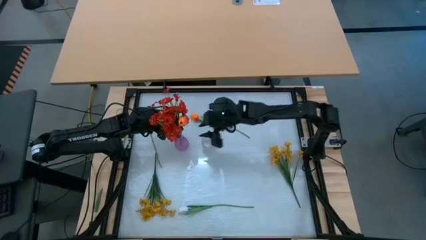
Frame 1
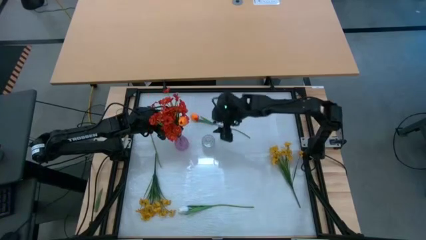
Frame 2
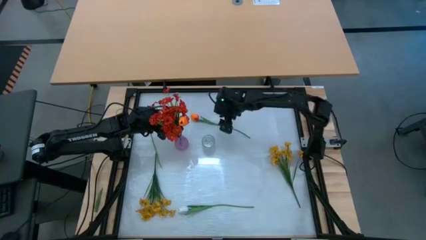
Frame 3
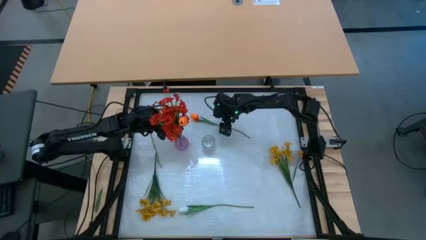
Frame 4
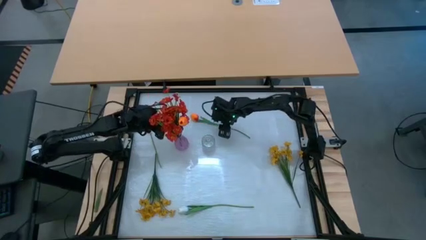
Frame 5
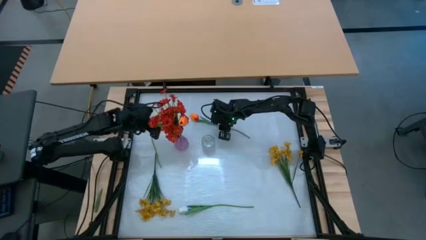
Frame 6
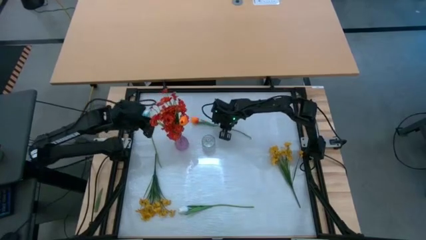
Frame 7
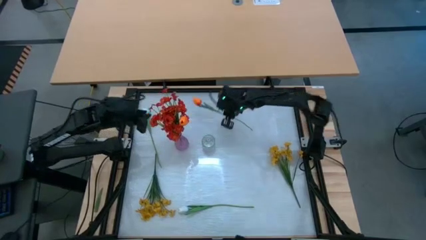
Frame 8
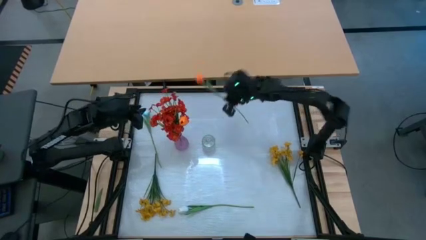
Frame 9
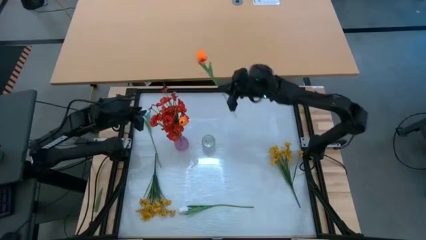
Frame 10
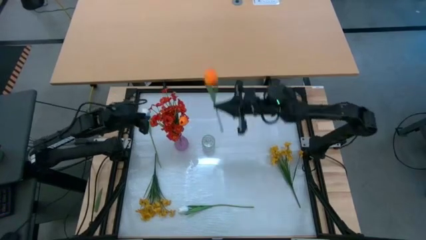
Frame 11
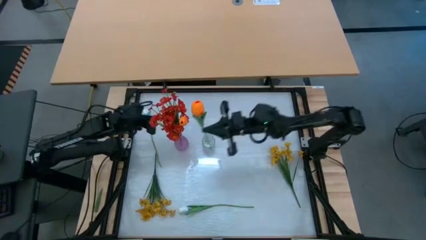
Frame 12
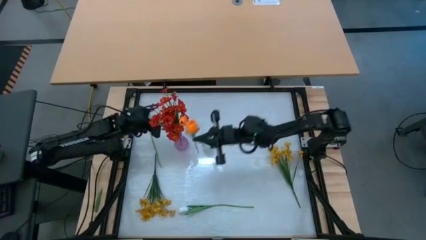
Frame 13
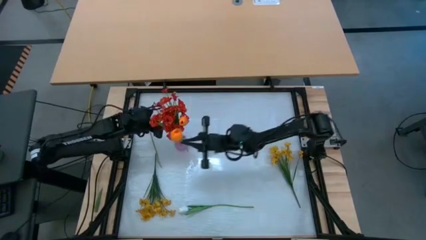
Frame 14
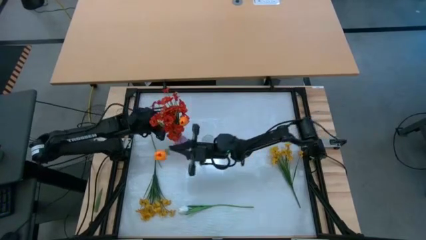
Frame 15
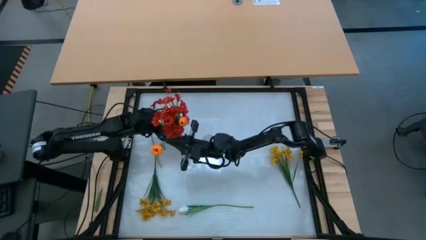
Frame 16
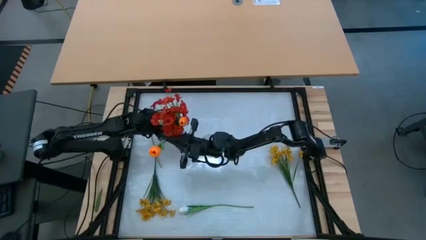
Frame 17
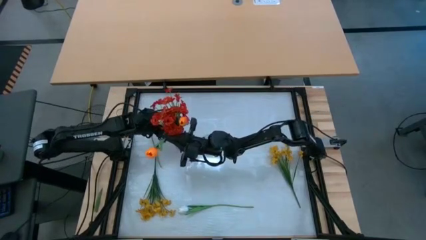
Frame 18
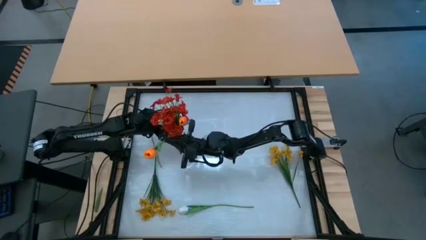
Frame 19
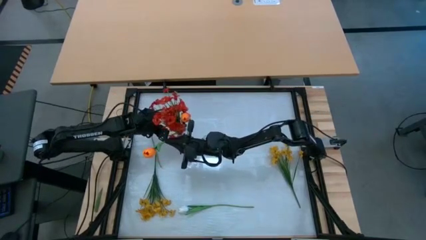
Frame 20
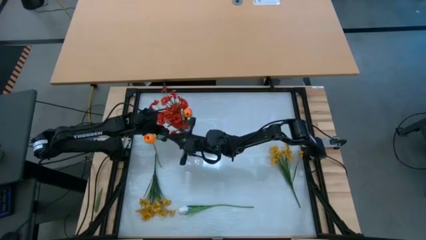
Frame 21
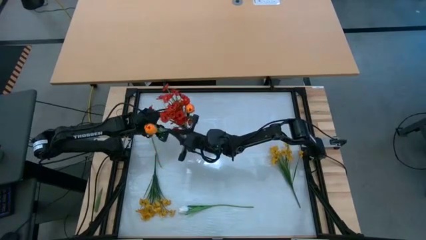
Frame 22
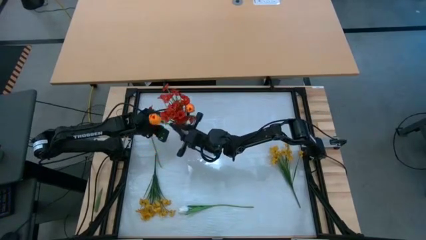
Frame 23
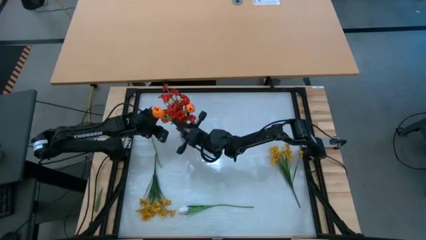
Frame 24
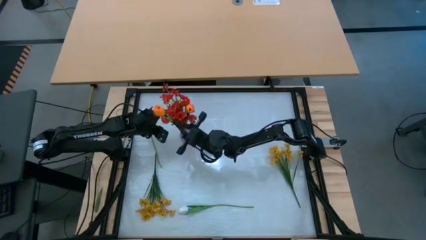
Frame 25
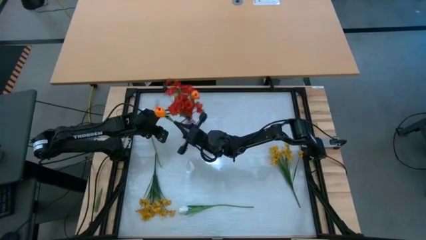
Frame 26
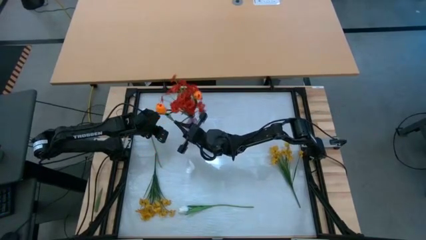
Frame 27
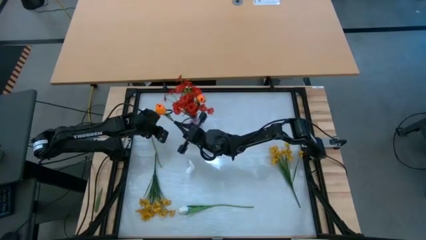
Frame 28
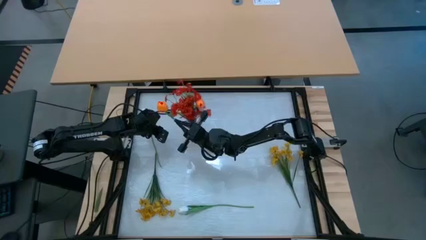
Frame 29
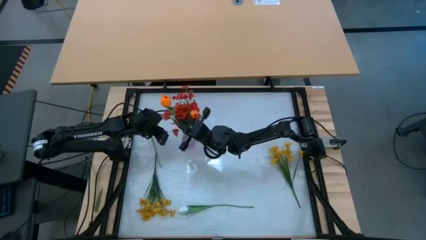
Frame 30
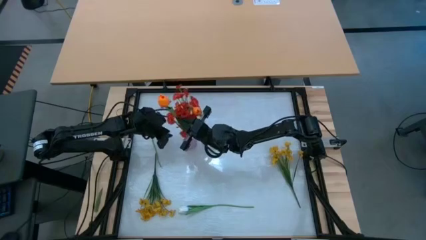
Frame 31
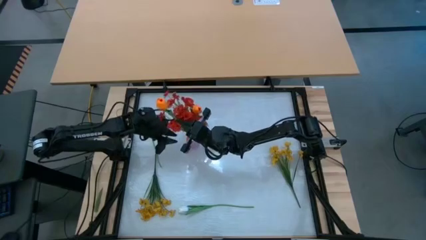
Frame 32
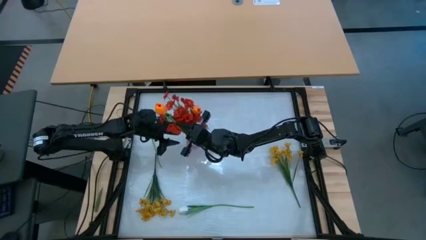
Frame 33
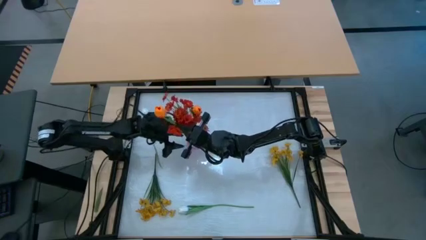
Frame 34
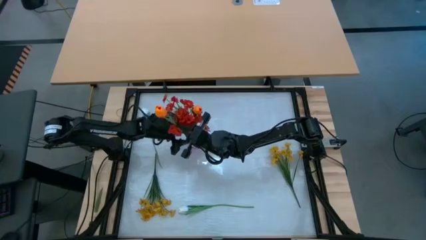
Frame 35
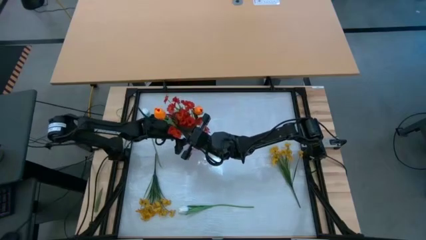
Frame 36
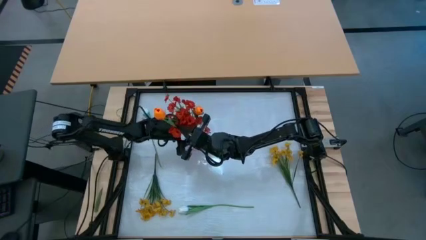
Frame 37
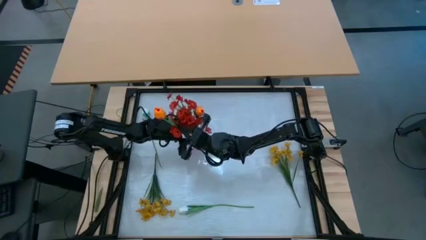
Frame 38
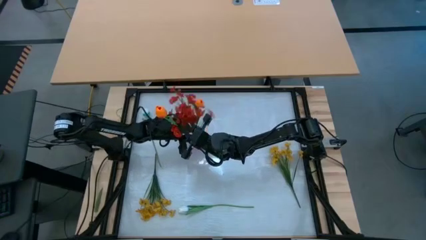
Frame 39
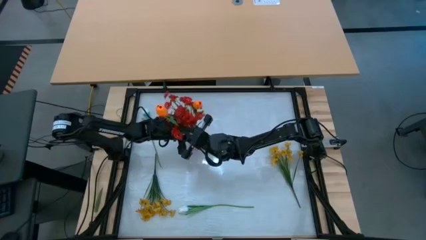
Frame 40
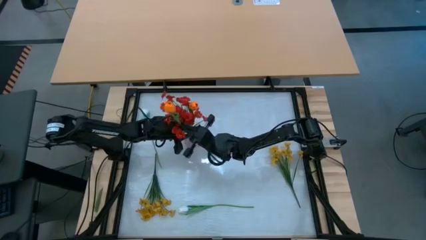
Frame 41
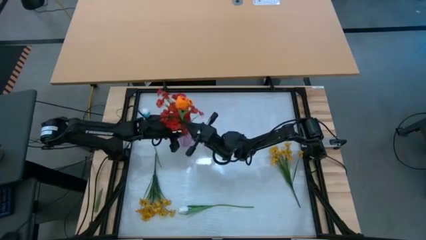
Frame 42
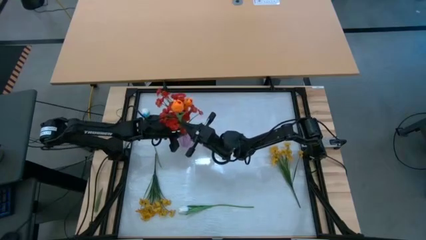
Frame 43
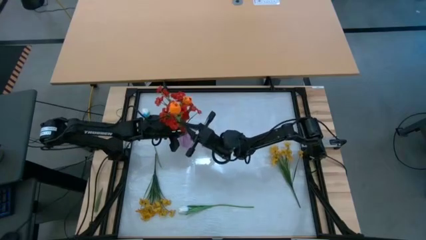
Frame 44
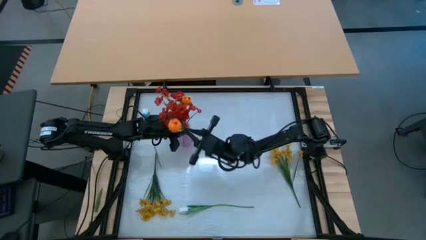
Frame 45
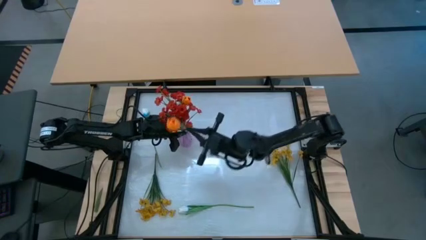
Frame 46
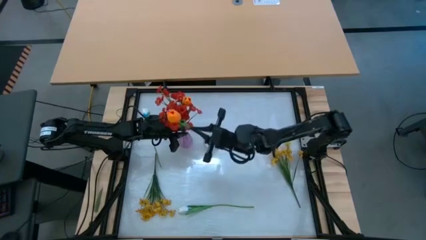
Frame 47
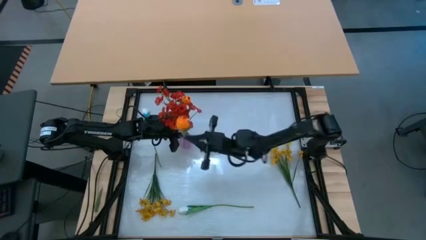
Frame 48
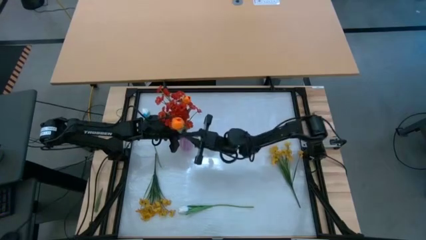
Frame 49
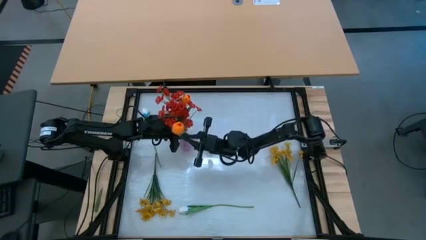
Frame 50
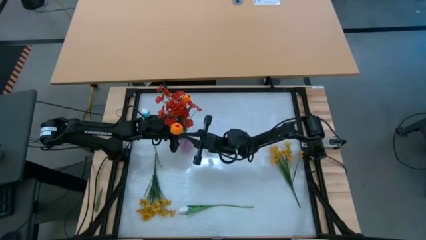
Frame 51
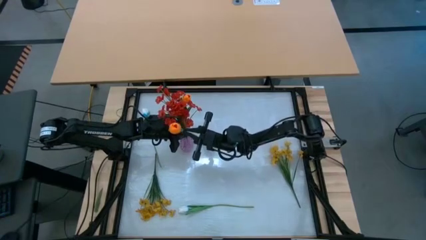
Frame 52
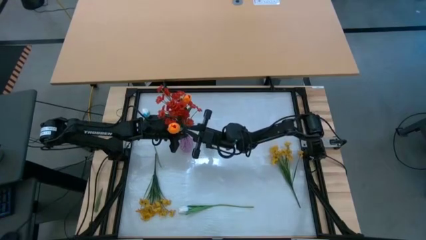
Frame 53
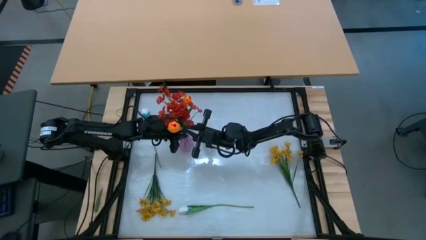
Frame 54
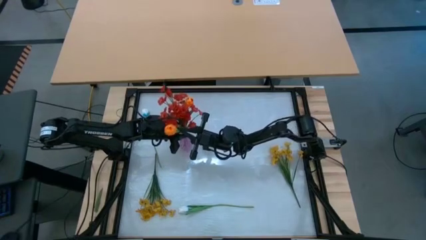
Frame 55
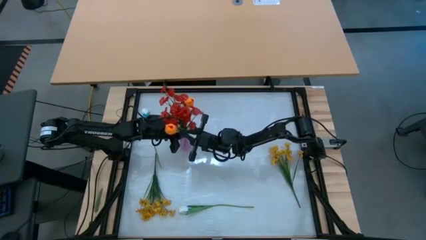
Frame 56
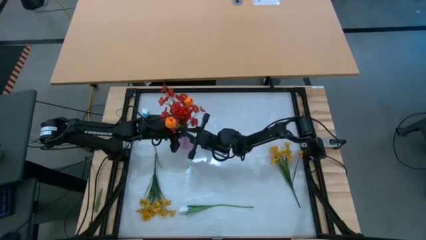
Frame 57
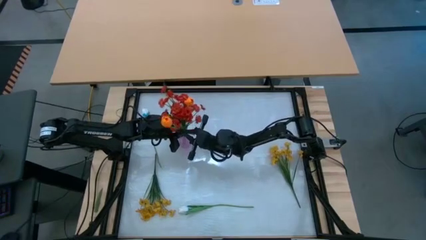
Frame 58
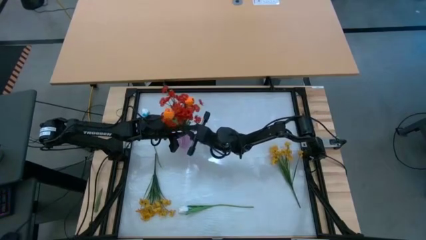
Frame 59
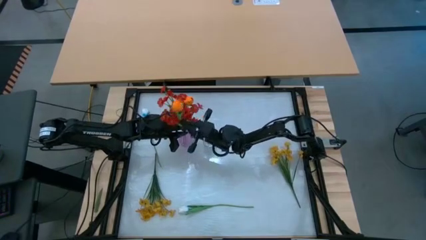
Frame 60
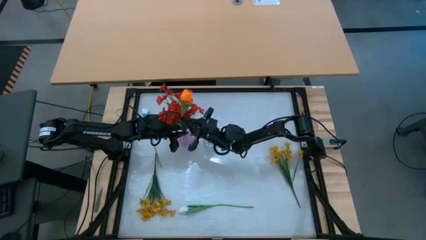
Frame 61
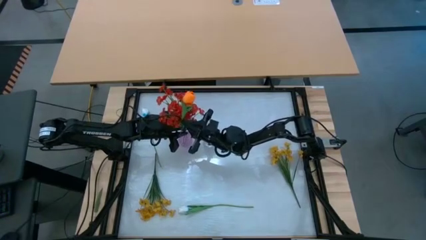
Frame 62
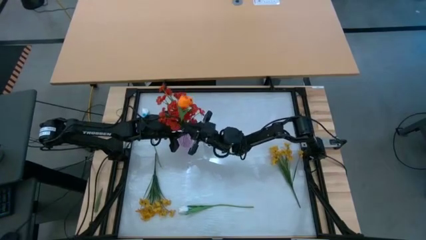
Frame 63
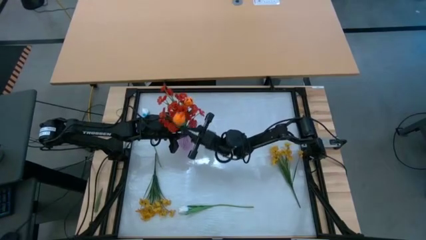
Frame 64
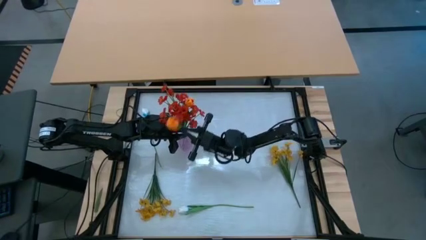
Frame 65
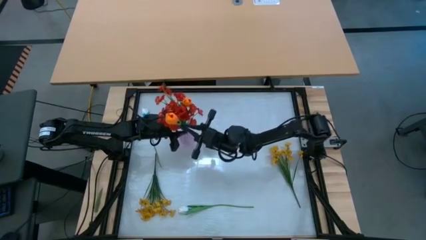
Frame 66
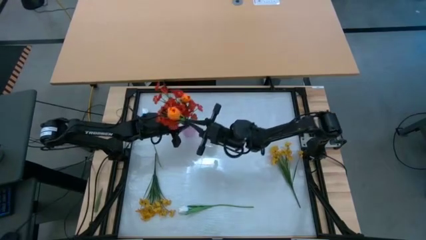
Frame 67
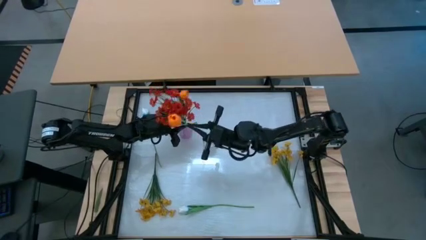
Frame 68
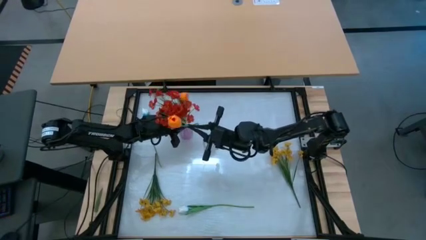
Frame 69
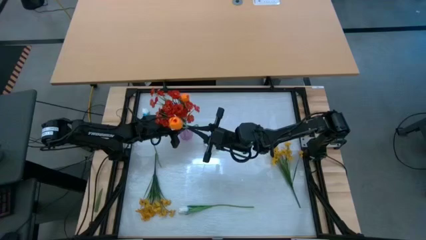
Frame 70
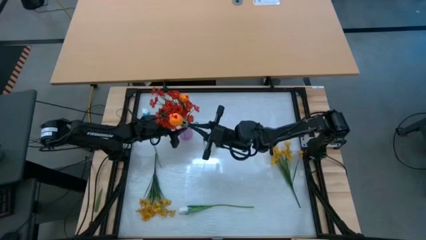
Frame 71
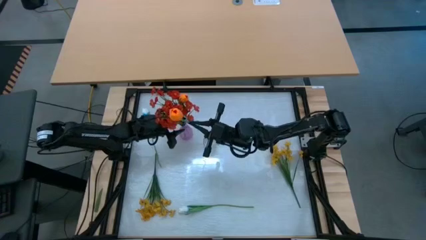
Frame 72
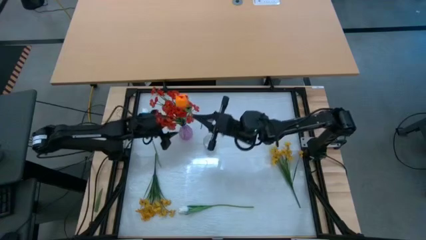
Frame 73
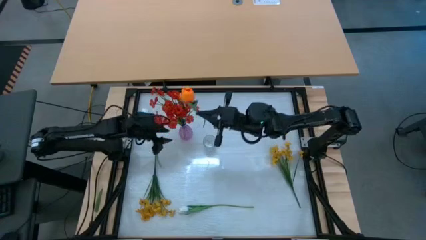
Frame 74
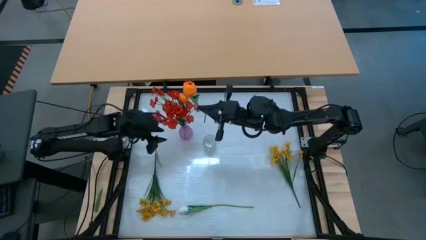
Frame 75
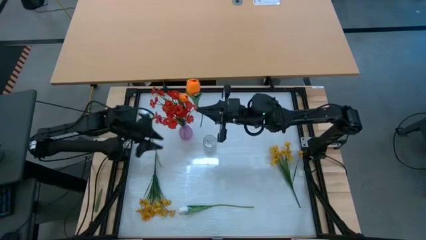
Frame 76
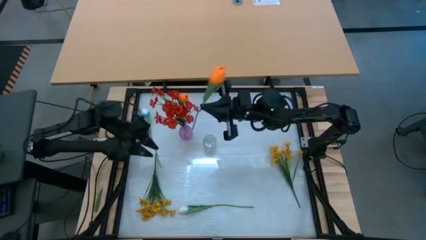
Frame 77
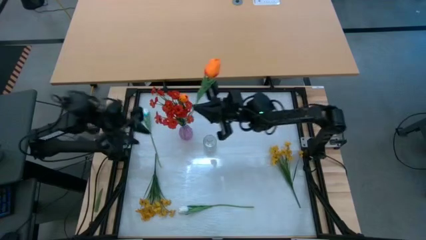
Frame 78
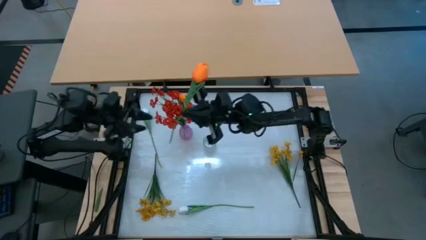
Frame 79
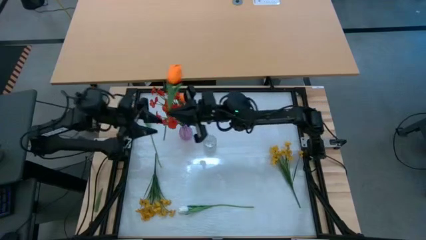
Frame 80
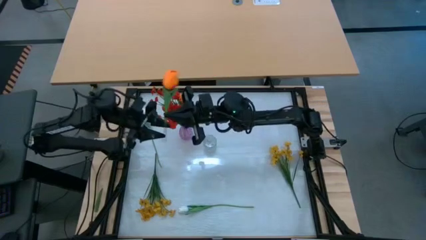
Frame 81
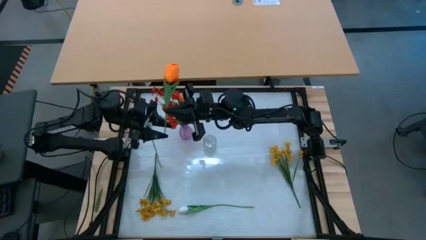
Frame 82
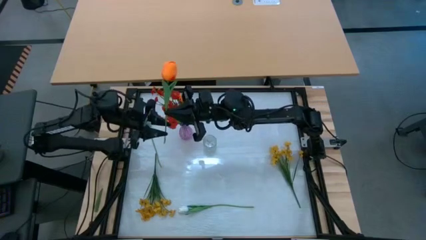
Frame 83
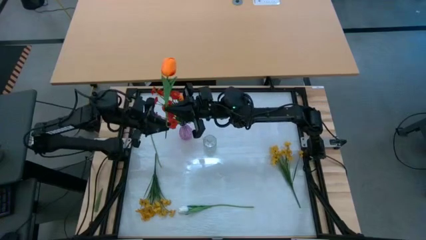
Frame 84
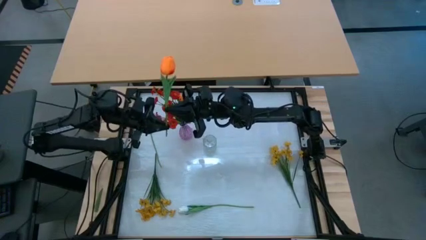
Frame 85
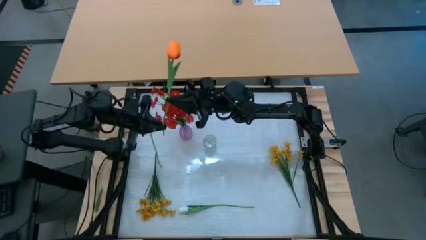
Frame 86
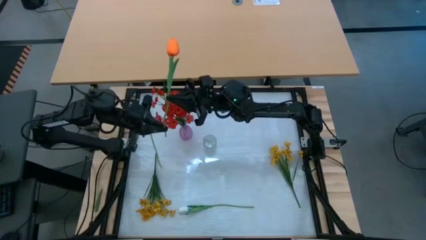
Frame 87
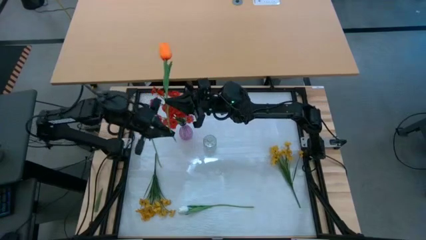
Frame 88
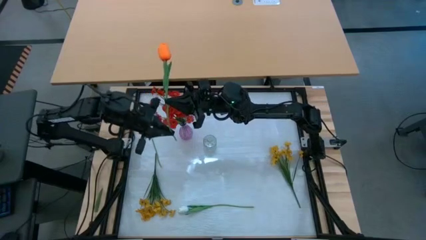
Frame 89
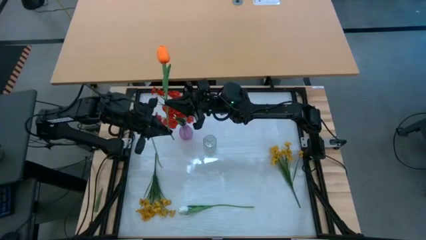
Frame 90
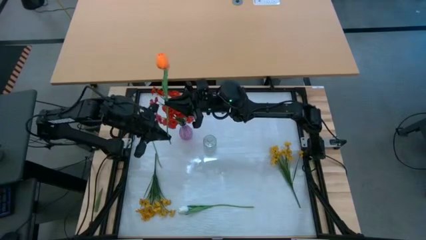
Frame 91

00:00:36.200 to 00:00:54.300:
Task: Sort flowers into vase by color
Put the orange tulip into the violet vase
